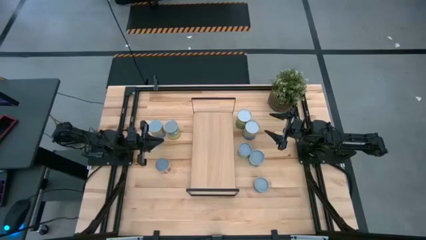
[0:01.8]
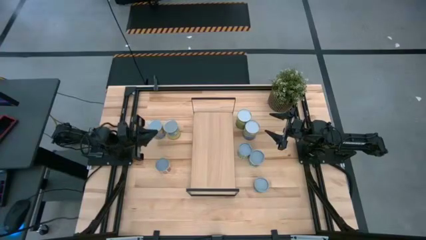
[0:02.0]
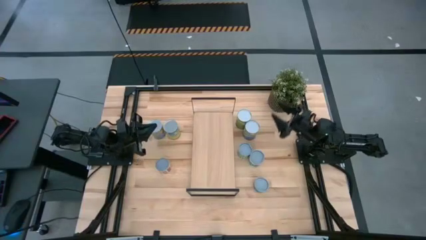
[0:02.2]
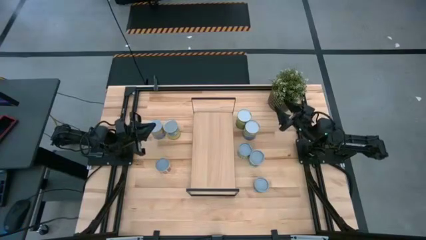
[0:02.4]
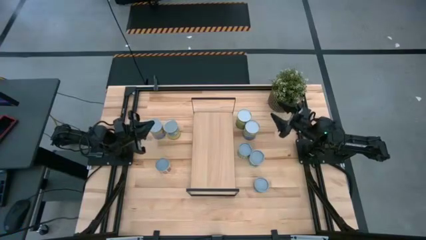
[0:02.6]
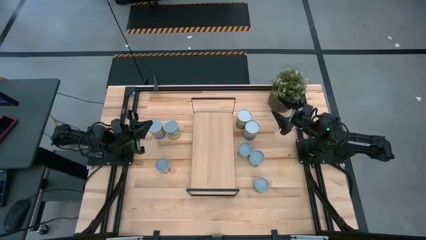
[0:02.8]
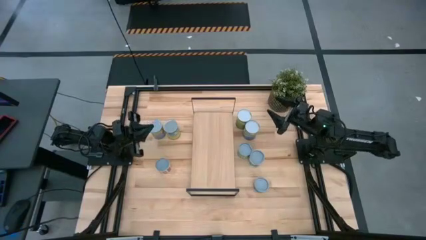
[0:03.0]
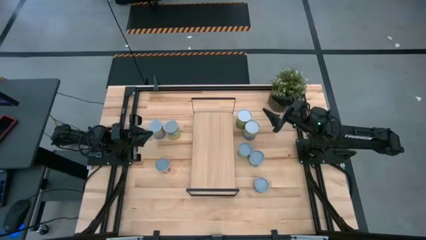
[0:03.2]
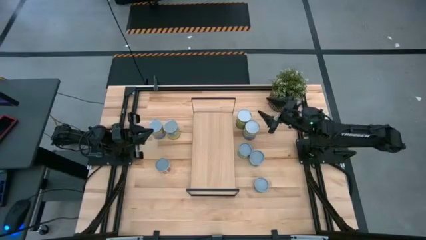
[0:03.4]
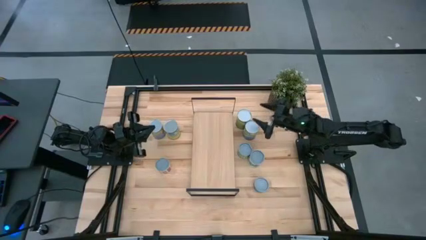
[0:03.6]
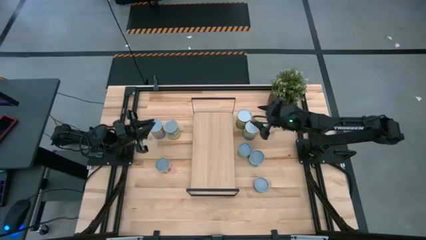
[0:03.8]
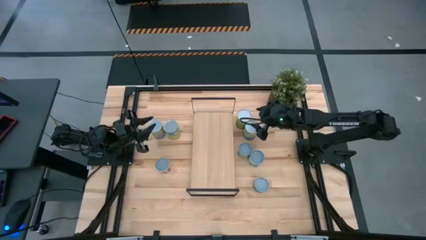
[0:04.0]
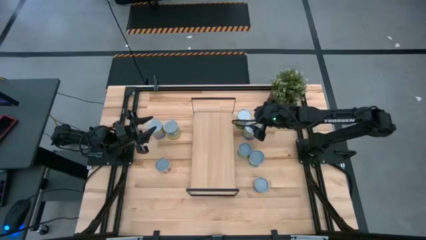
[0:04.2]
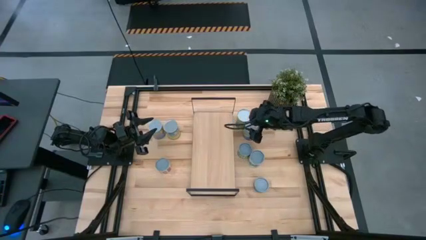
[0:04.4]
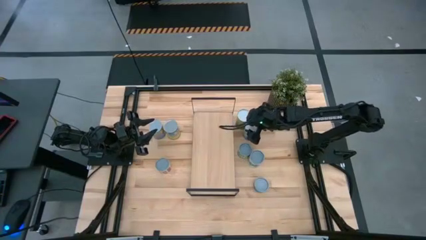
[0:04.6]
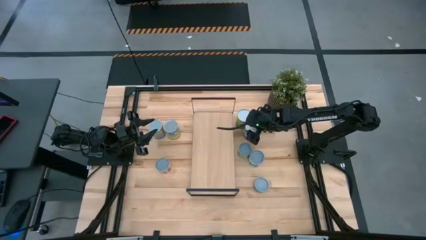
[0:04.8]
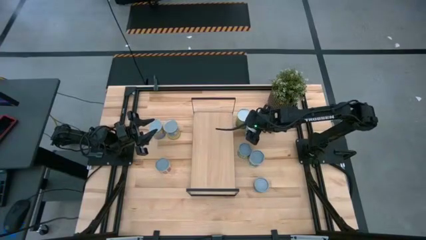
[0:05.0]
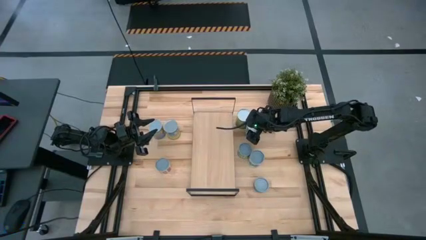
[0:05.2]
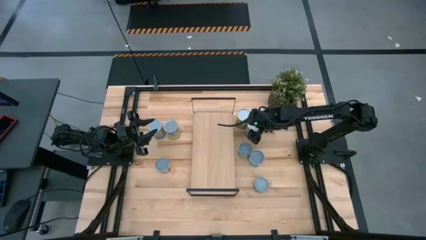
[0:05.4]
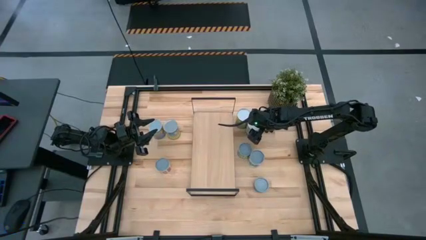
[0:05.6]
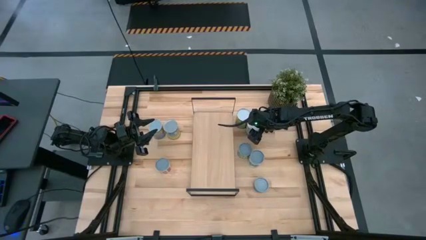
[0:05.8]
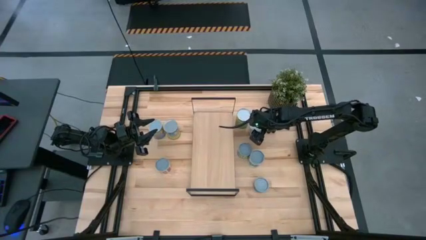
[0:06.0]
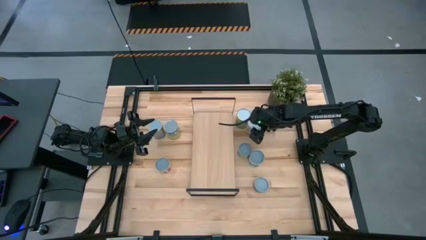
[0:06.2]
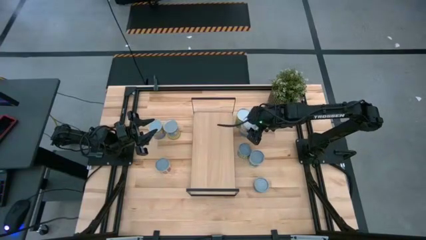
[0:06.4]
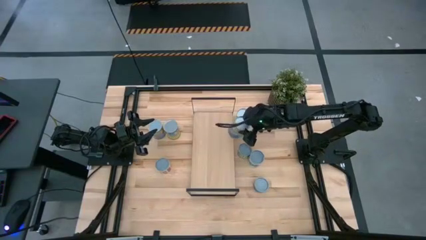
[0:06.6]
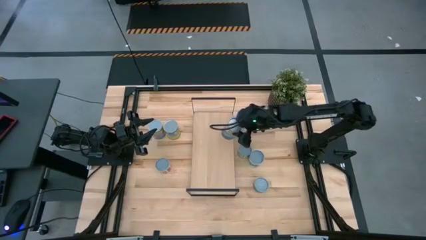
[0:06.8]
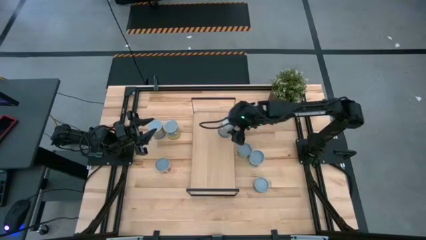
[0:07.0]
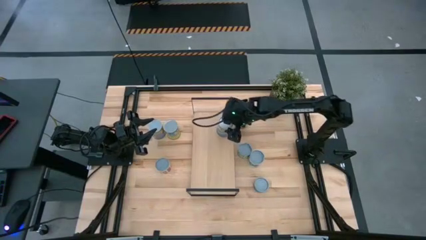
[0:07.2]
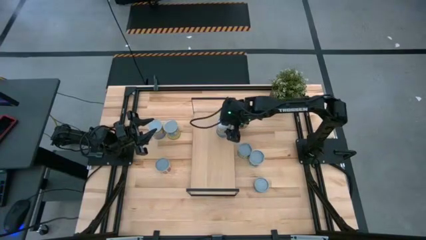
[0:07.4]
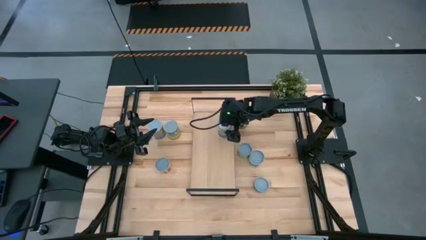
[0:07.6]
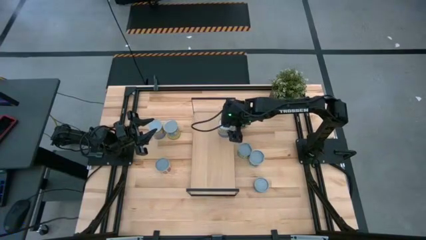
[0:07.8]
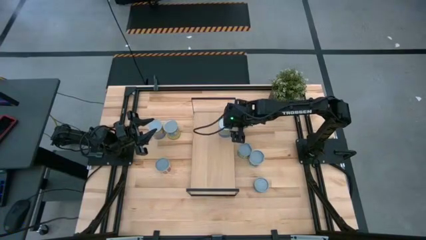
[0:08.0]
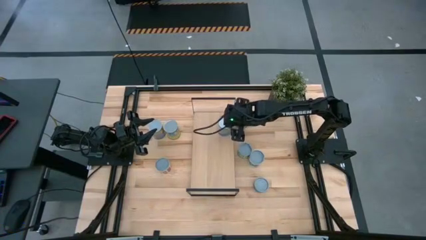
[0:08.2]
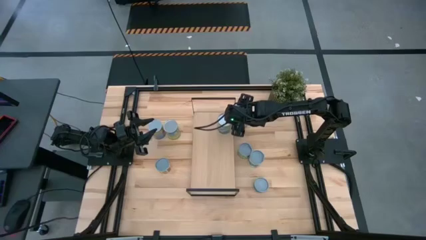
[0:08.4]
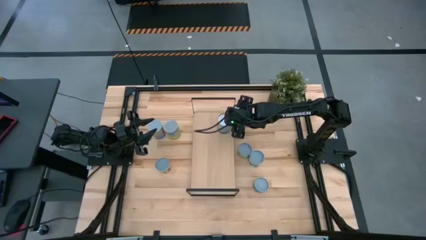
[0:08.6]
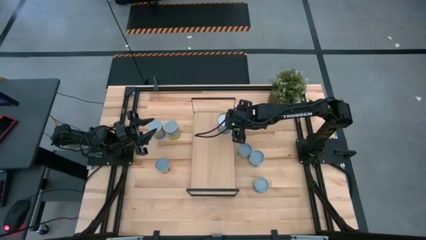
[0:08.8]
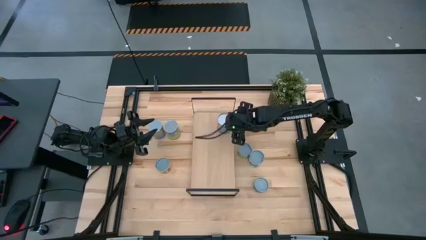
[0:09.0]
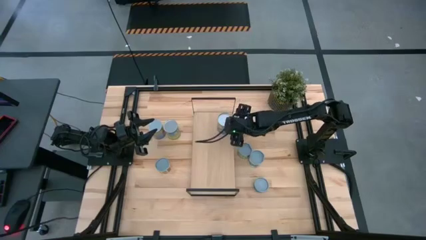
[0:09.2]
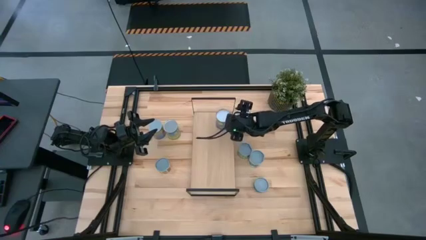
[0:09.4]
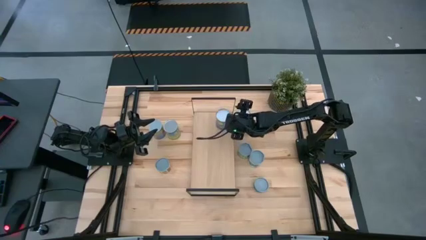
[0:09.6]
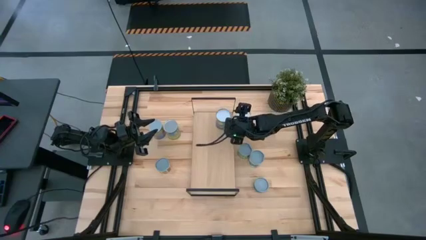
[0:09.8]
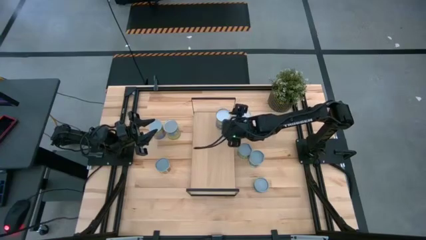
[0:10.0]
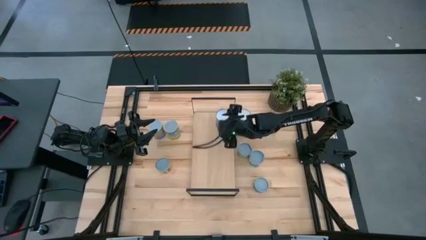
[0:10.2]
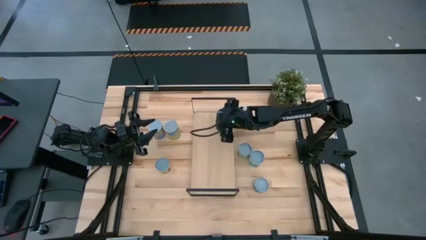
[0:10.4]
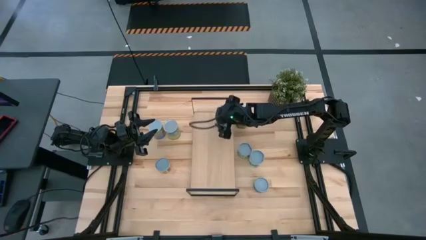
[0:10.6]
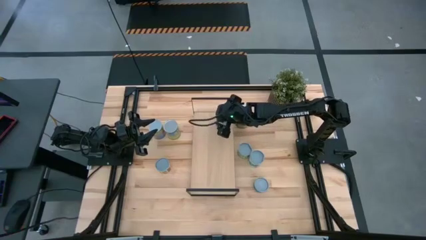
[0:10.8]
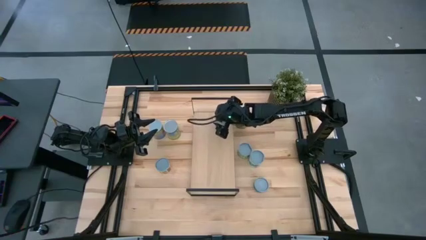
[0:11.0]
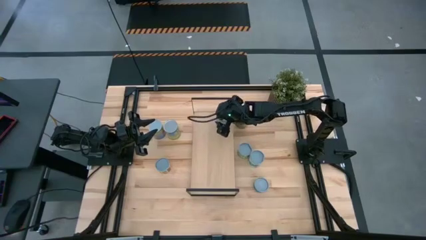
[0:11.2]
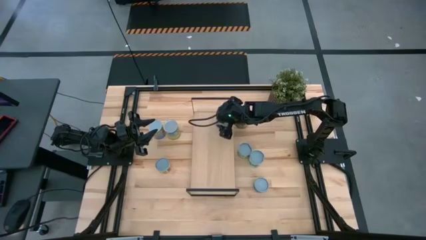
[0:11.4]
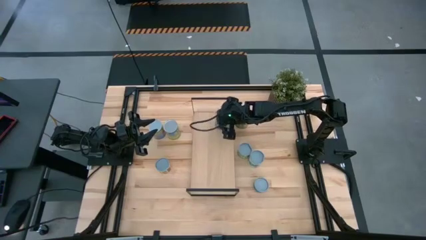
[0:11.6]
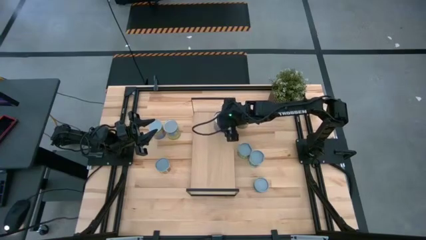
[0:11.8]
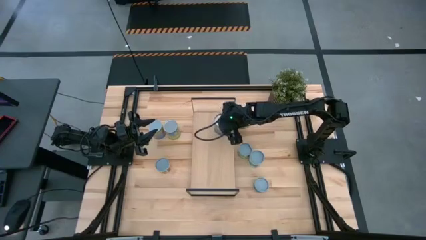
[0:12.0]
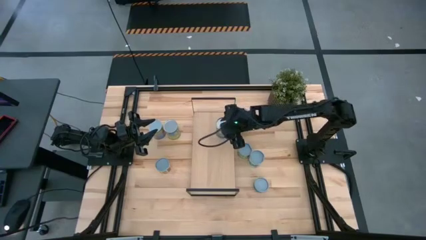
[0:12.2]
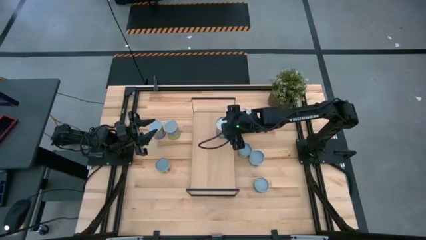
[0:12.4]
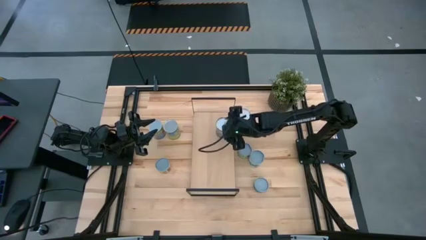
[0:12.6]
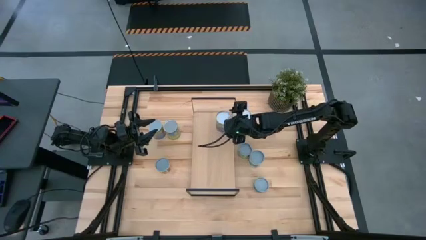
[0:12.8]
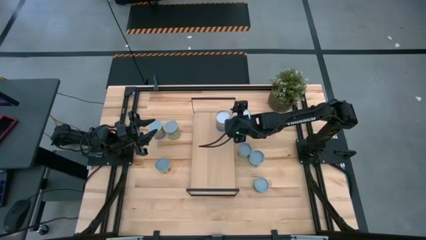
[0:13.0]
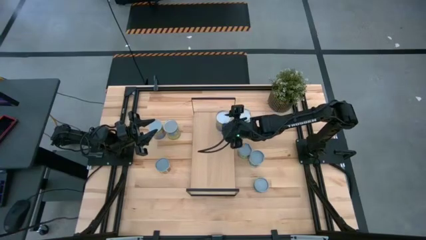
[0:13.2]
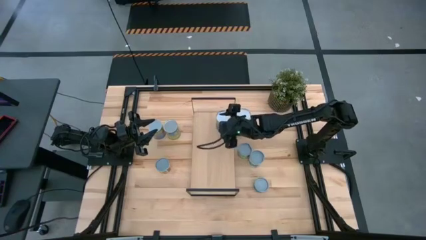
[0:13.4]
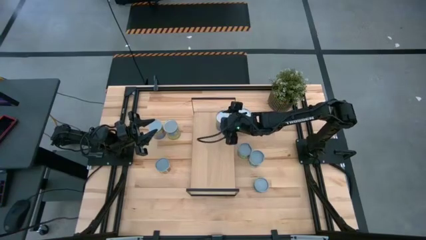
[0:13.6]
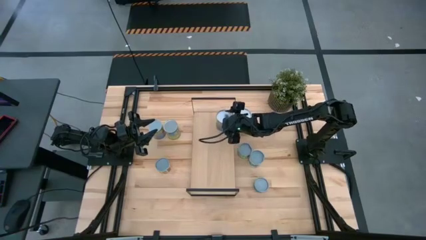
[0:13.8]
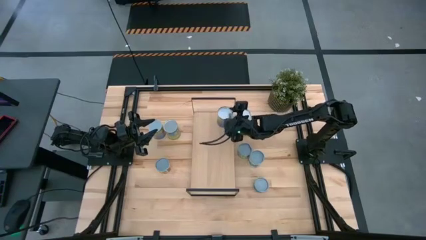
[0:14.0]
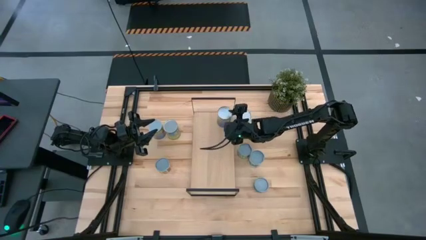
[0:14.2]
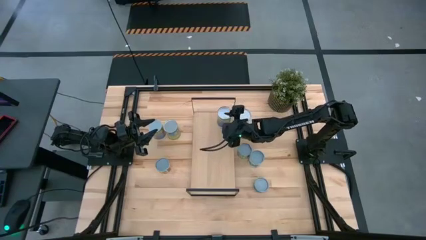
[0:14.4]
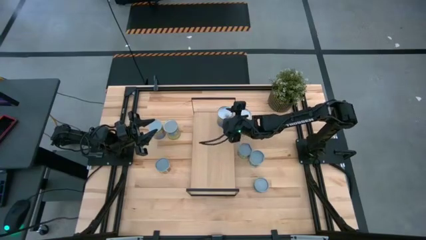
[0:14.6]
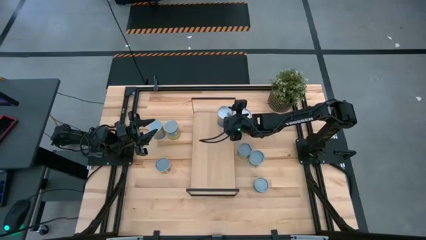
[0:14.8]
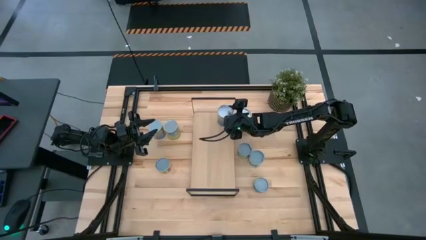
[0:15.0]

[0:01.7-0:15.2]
Task: Pick and place cans onto a shelf
Put the canned peas on the shelf
